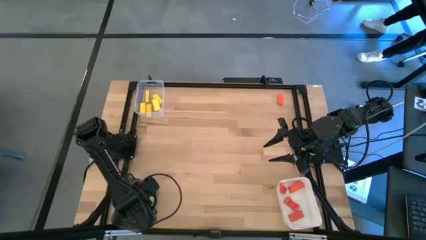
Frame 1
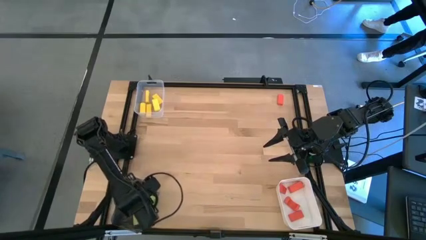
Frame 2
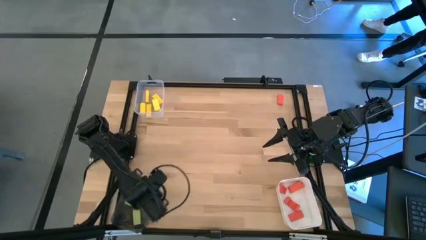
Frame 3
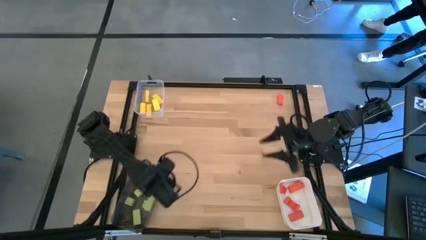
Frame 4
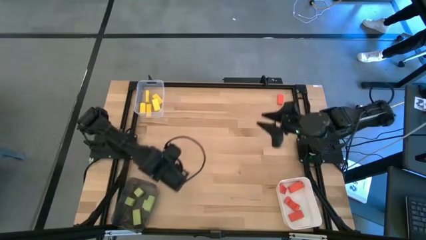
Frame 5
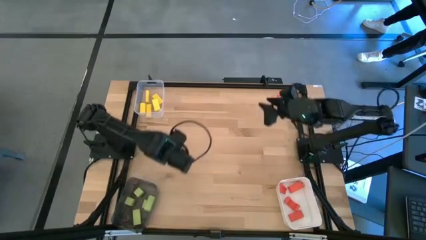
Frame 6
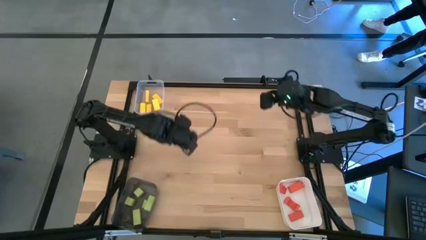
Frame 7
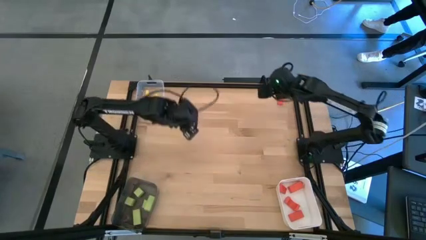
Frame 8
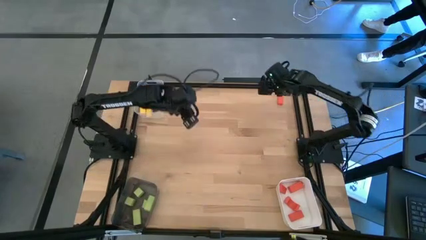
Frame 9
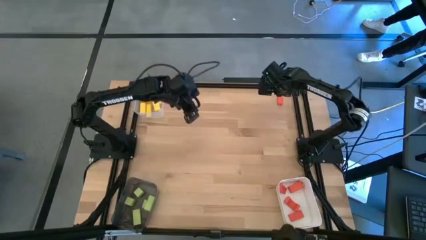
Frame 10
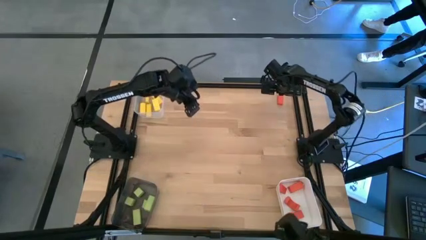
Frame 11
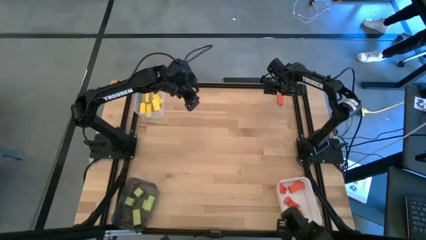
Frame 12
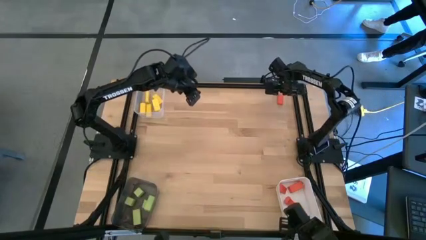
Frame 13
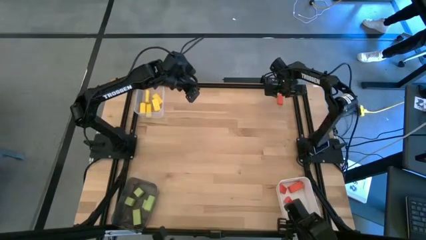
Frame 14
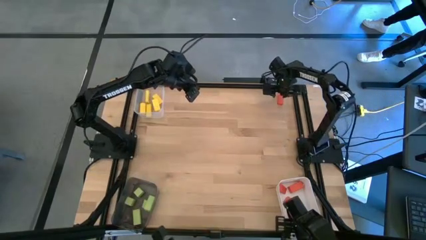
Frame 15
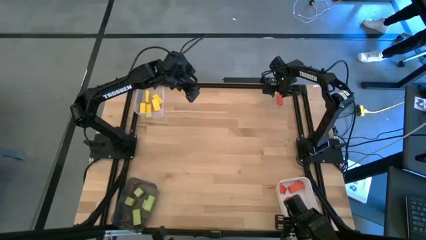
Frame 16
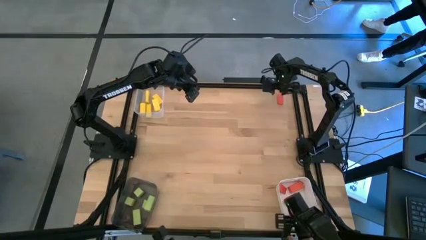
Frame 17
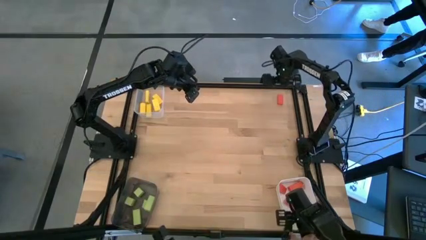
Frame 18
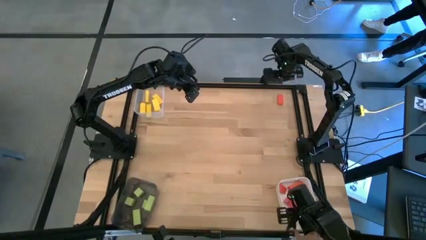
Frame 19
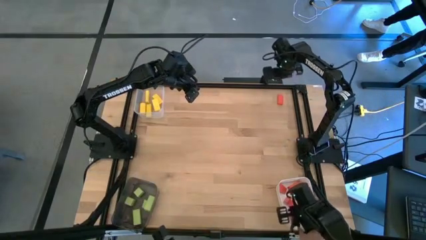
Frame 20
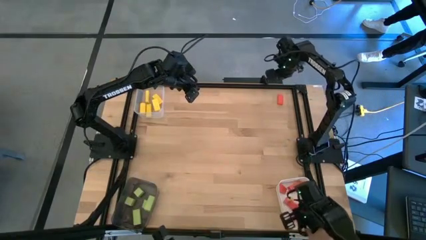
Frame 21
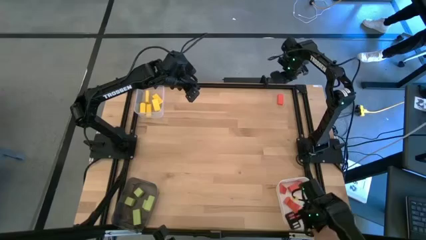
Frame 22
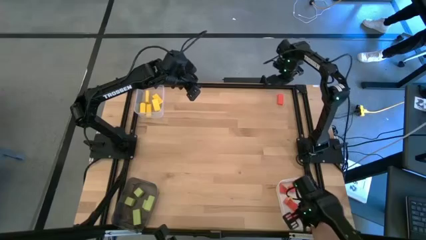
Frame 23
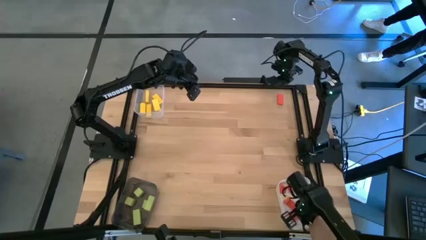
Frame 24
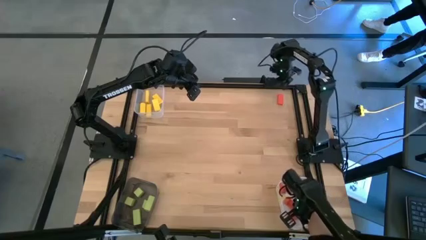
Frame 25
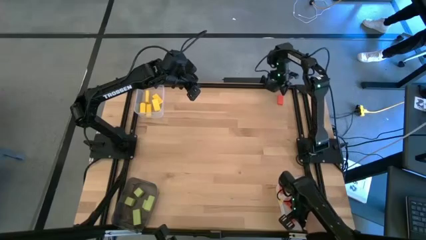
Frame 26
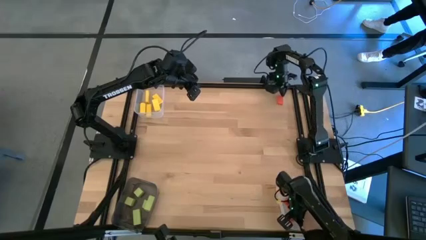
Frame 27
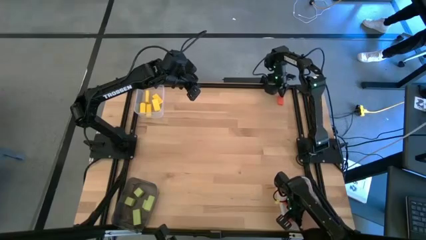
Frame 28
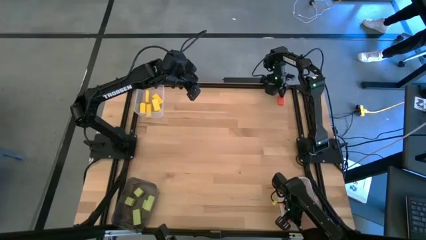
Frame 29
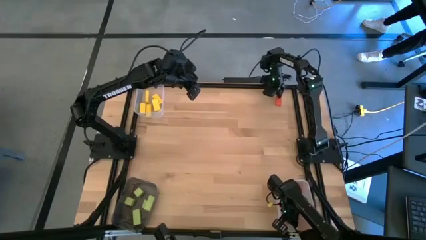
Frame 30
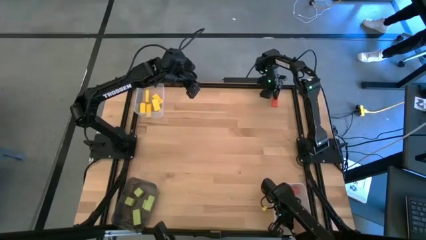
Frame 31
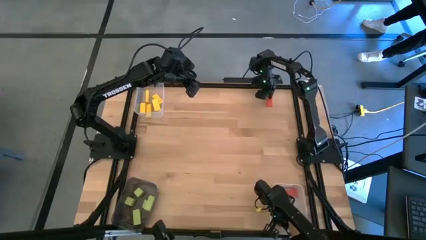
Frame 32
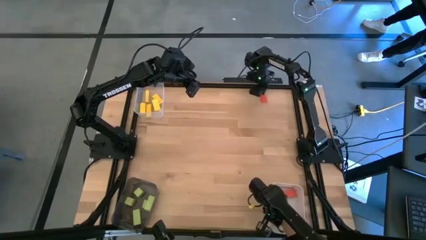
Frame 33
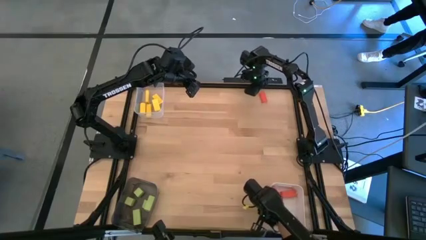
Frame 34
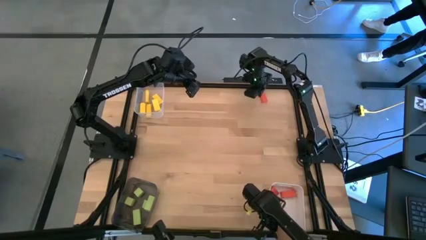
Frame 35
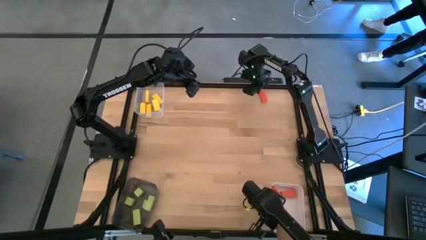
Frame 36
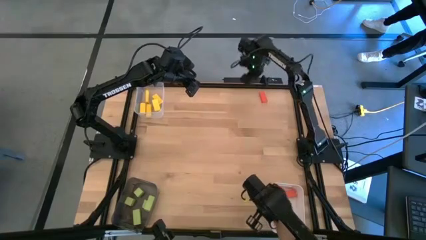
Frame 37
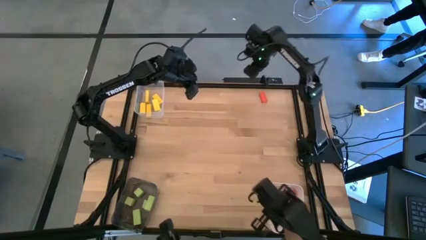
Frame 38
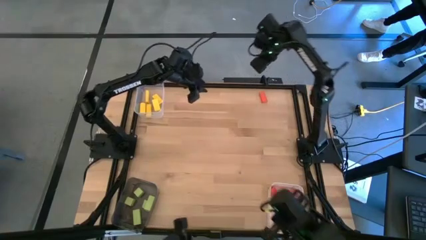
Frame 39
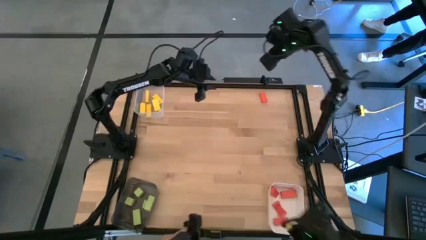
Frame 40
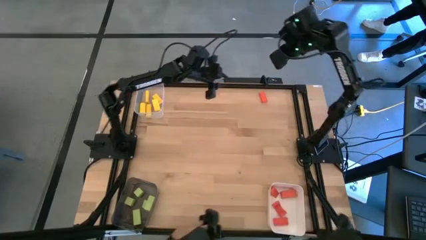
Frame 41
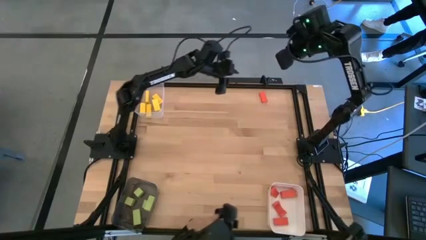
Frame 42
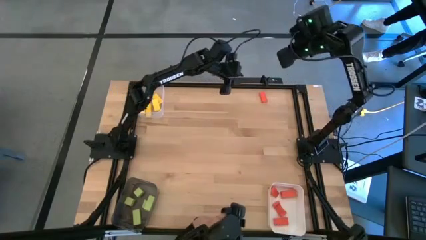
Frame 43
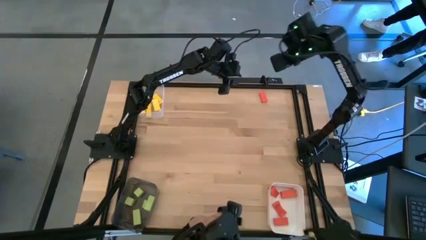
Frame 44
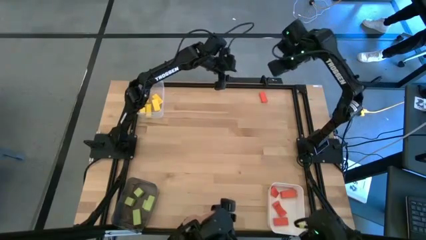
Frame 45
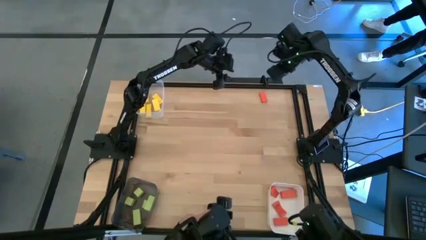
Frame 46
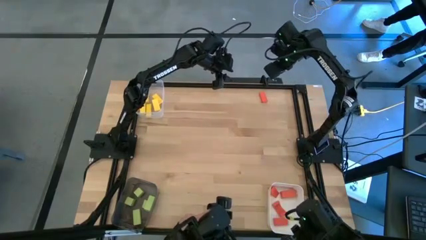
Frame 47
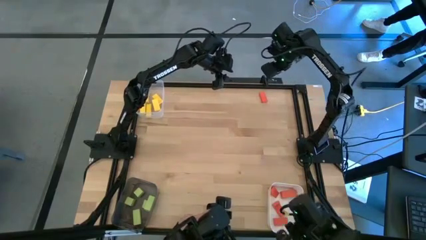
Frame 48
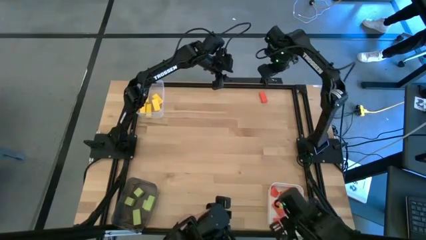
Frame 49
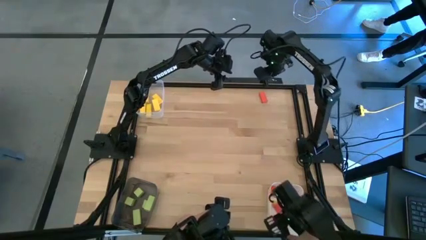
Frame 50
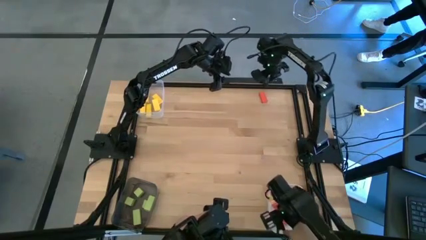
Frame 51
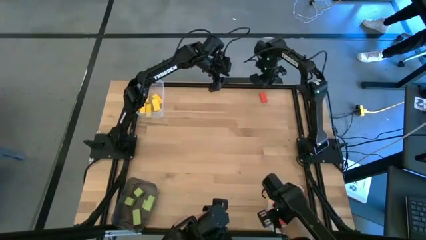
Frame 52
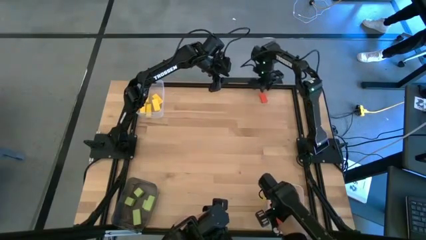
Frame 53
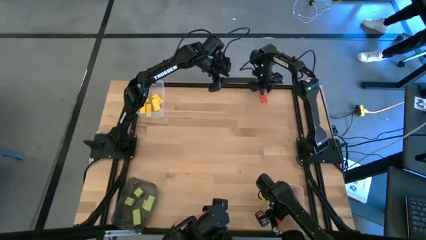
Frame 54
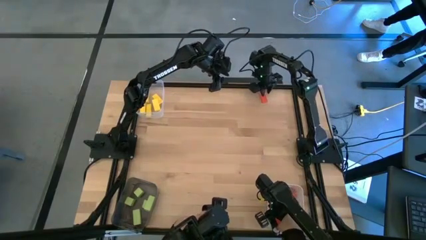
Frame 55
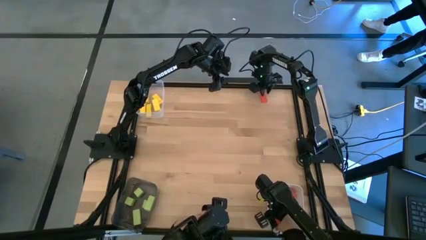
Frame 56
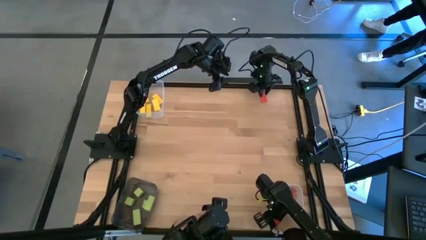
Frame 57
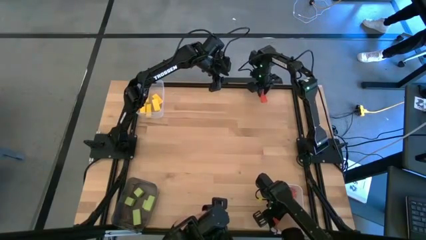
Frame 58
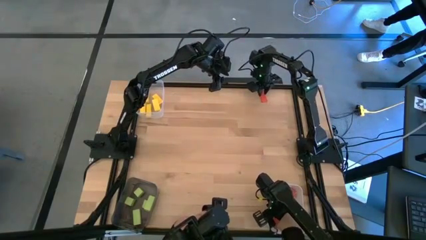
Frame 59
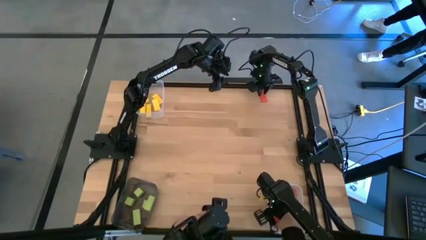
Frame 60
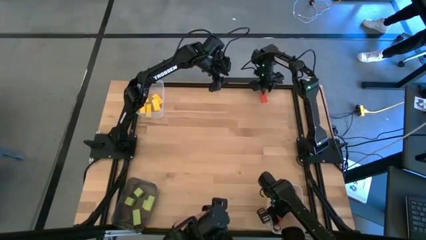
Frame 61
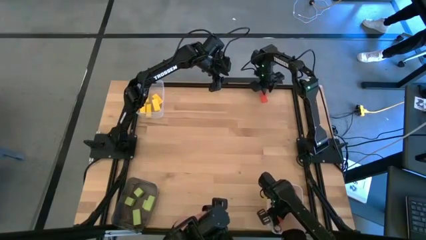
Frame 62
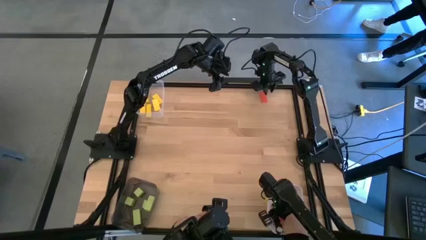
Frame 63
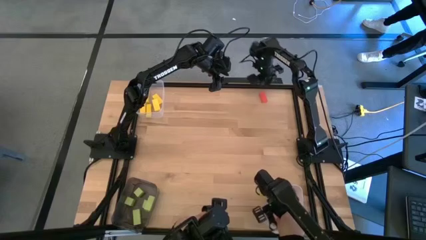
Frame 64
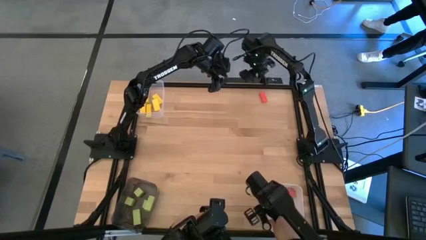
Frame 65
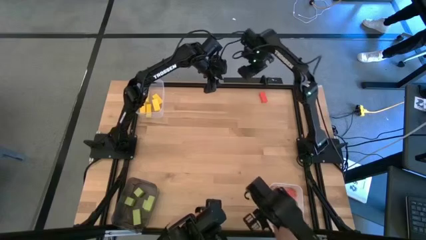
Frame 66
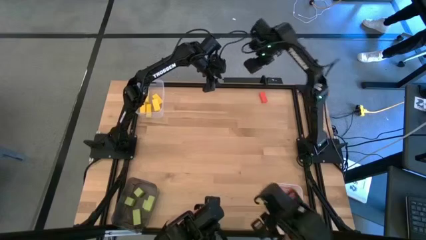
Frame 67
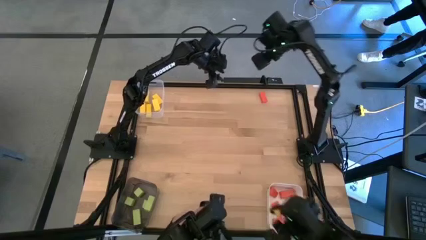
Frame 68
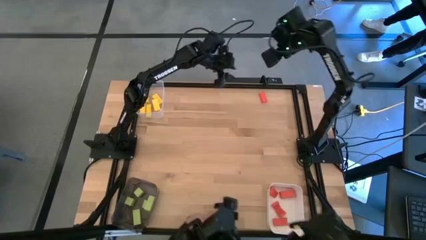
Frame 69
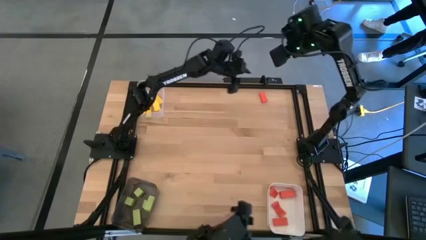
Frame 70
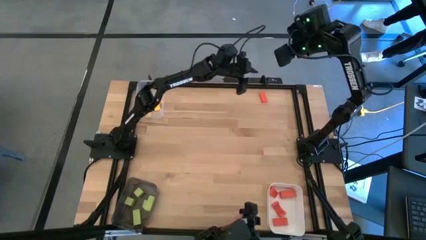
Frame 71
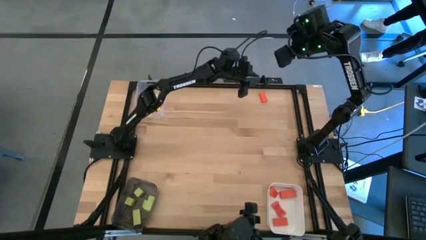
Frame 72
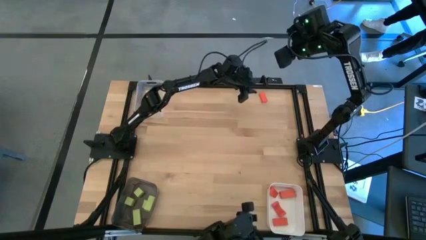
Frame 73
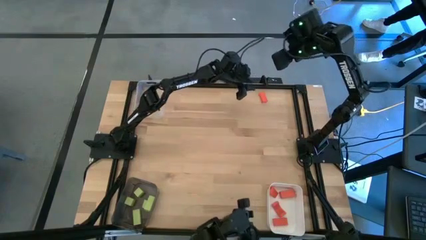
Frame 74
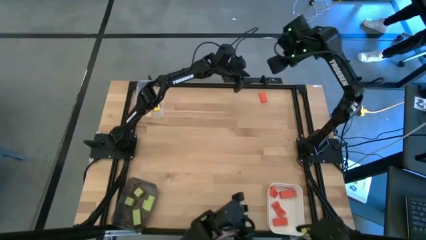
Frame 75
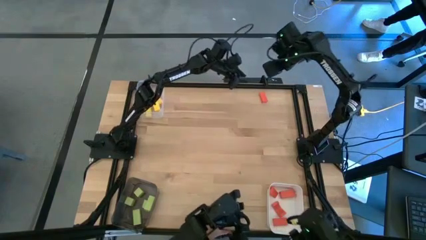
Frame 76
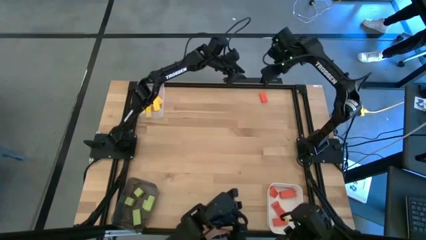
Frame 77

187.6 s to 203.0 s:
Task: Sort & place blocks by color
Put the orange block into the white bin
